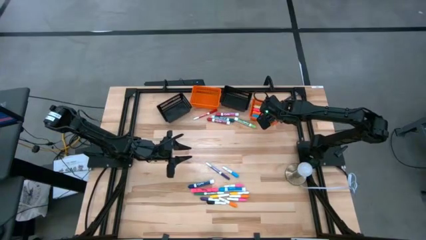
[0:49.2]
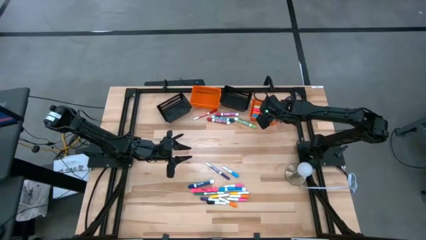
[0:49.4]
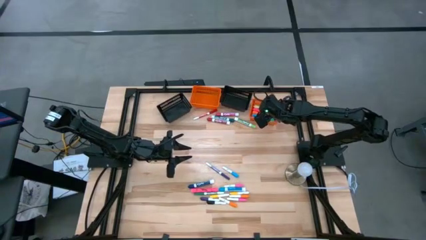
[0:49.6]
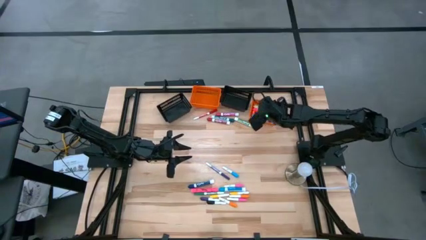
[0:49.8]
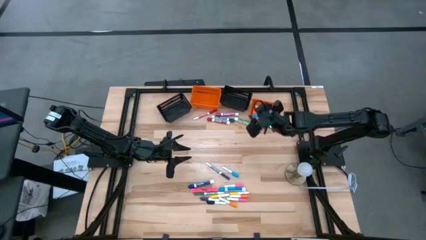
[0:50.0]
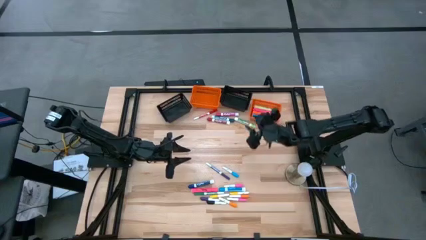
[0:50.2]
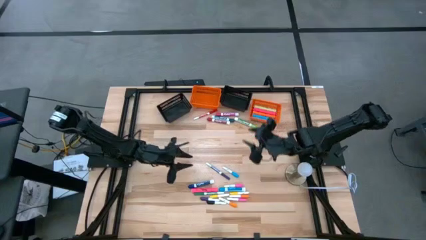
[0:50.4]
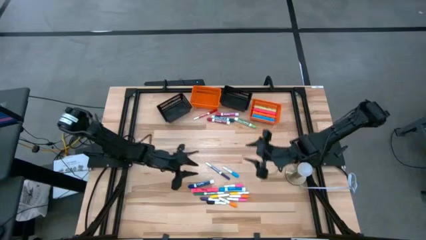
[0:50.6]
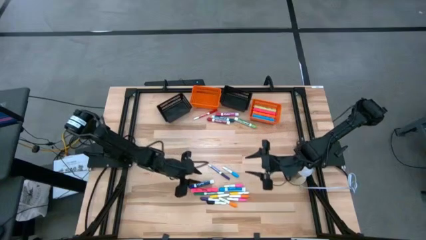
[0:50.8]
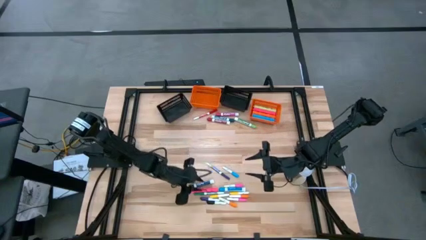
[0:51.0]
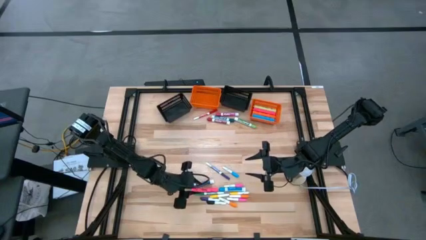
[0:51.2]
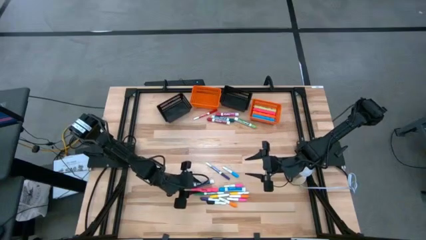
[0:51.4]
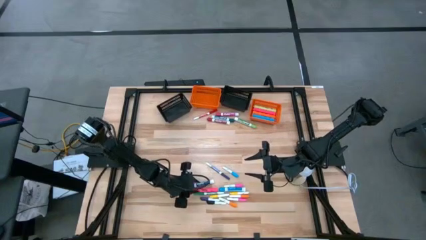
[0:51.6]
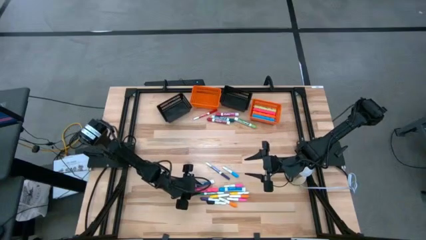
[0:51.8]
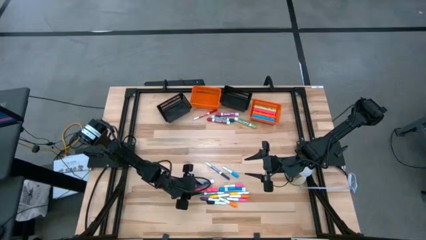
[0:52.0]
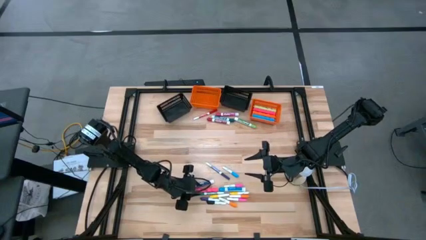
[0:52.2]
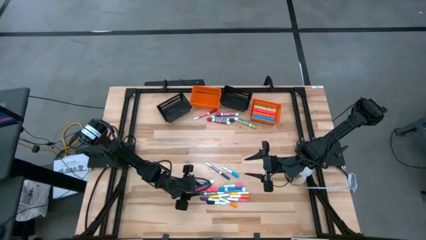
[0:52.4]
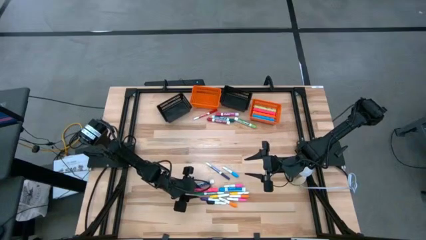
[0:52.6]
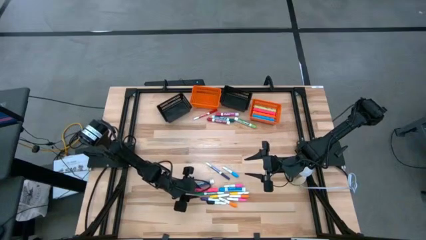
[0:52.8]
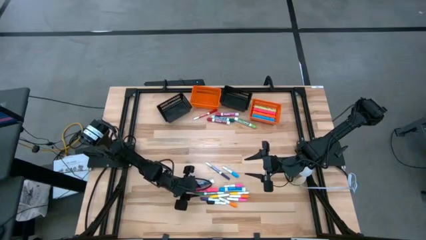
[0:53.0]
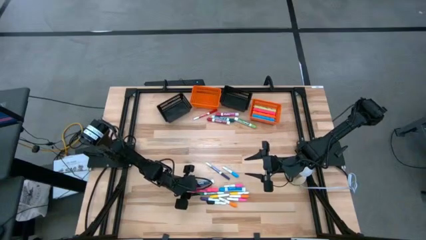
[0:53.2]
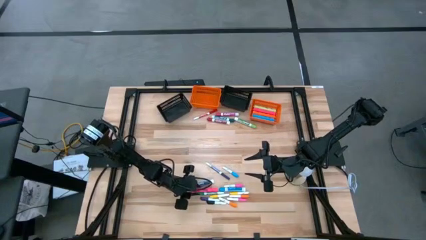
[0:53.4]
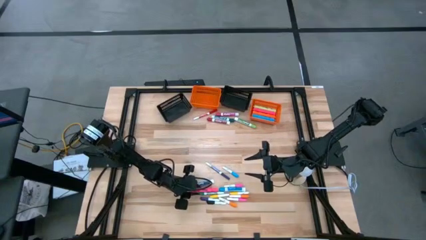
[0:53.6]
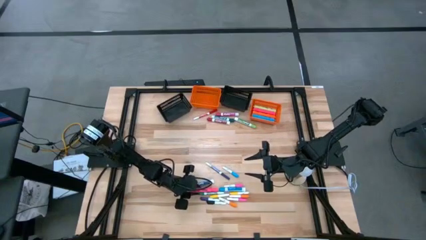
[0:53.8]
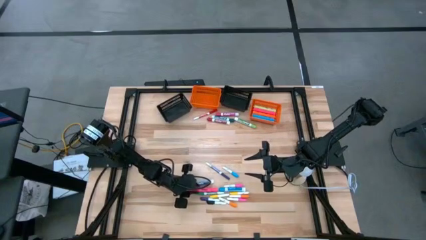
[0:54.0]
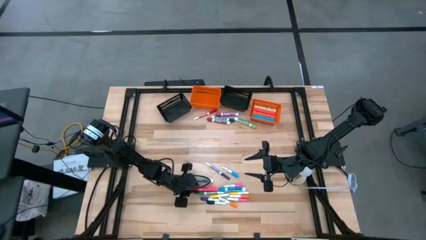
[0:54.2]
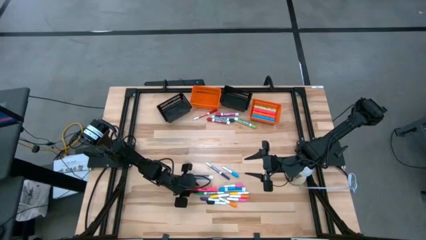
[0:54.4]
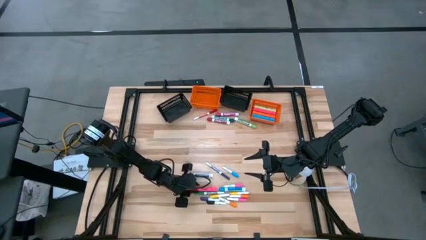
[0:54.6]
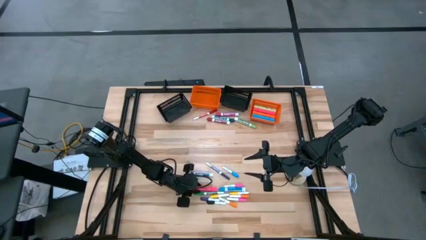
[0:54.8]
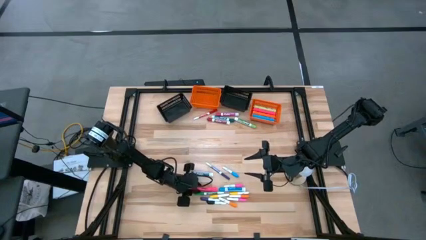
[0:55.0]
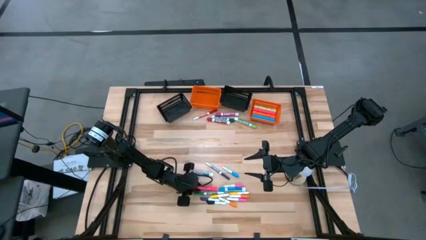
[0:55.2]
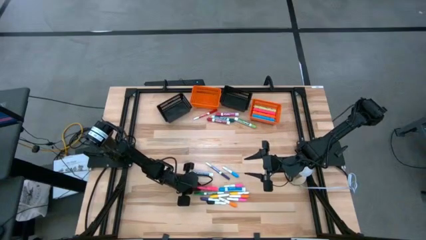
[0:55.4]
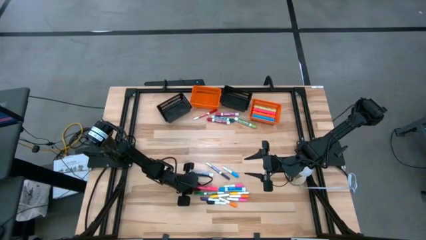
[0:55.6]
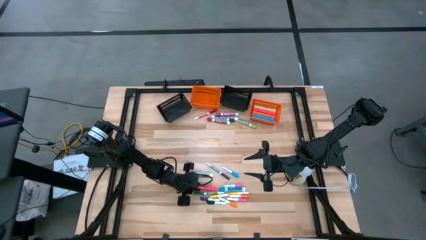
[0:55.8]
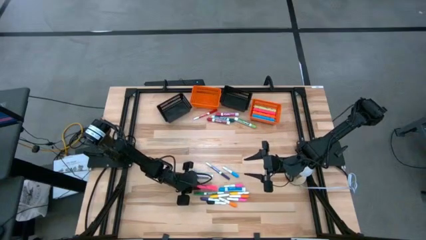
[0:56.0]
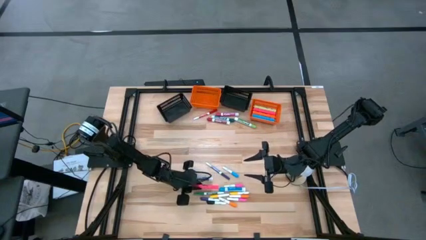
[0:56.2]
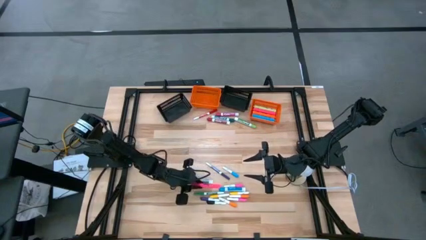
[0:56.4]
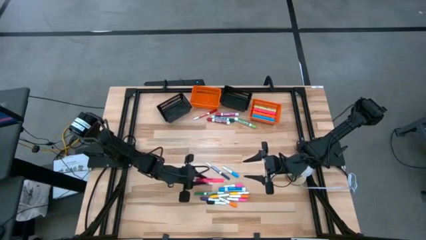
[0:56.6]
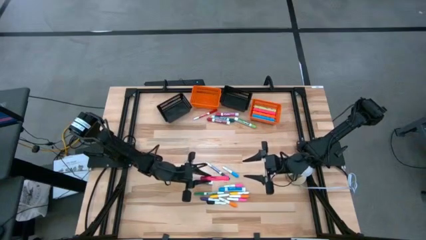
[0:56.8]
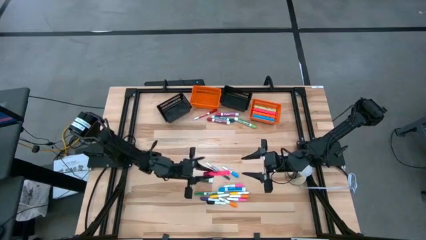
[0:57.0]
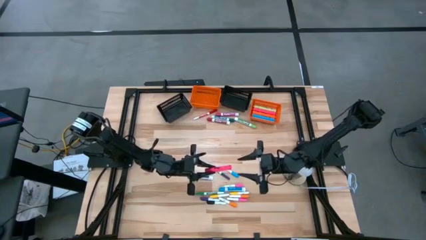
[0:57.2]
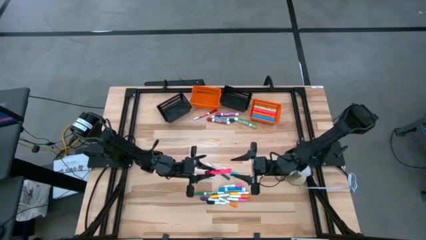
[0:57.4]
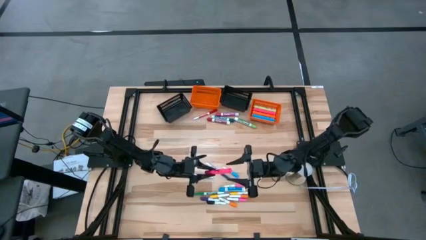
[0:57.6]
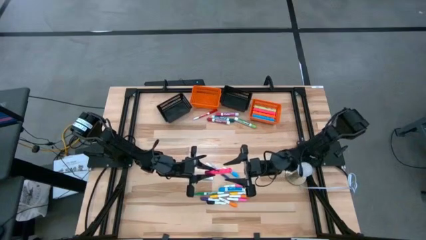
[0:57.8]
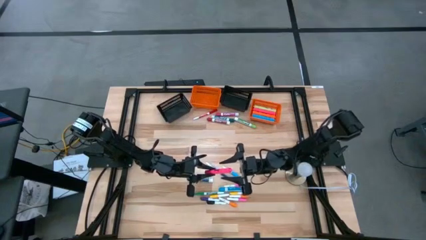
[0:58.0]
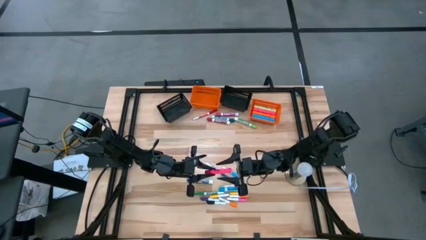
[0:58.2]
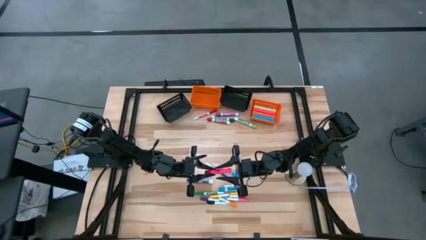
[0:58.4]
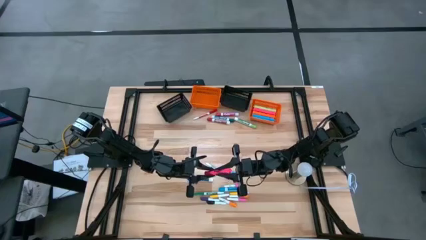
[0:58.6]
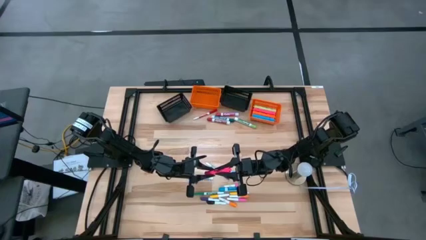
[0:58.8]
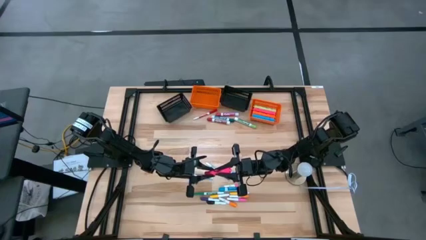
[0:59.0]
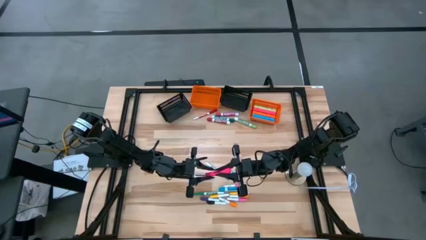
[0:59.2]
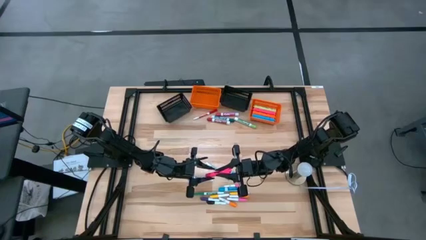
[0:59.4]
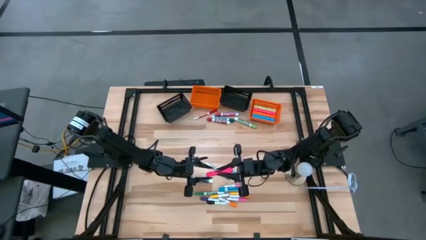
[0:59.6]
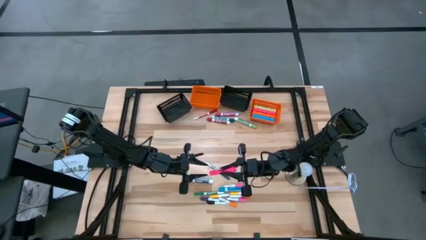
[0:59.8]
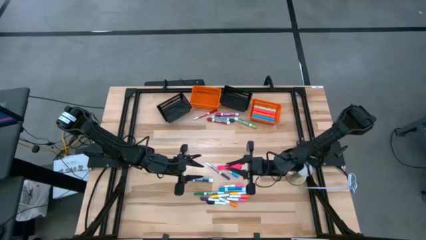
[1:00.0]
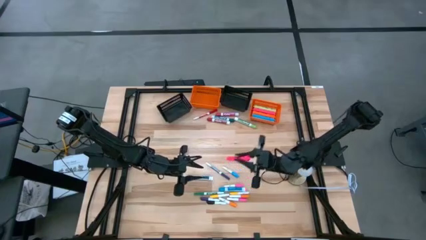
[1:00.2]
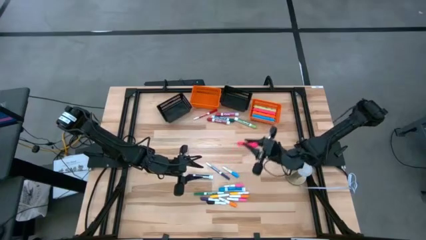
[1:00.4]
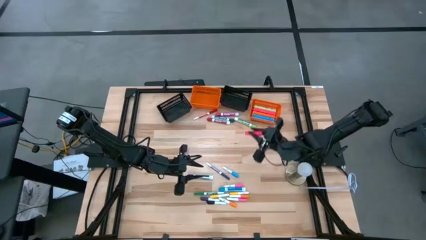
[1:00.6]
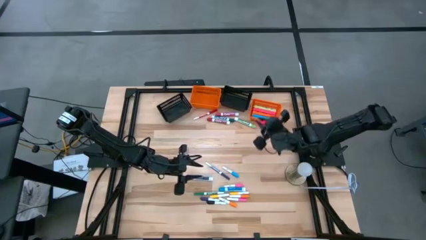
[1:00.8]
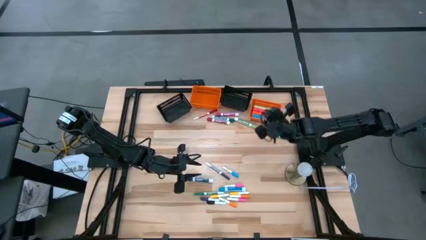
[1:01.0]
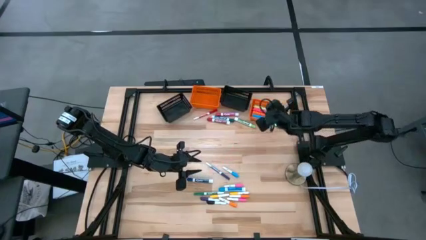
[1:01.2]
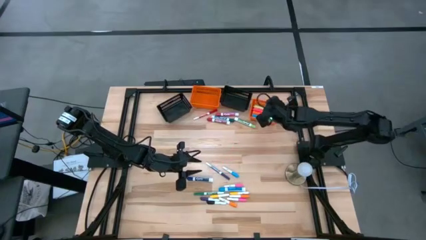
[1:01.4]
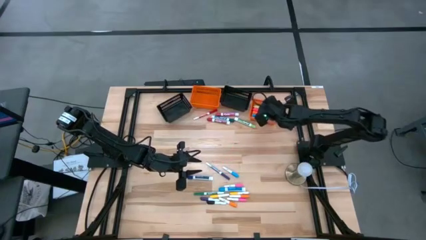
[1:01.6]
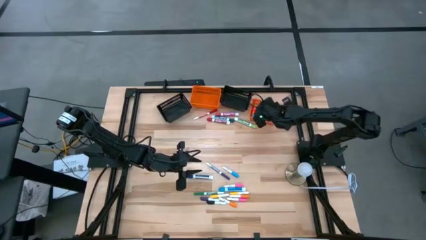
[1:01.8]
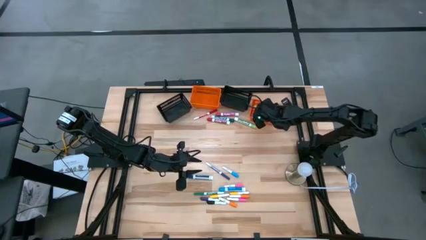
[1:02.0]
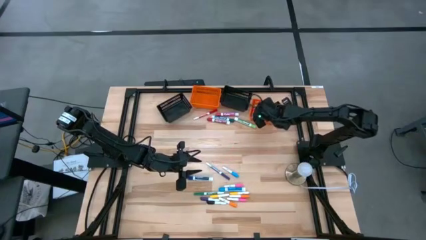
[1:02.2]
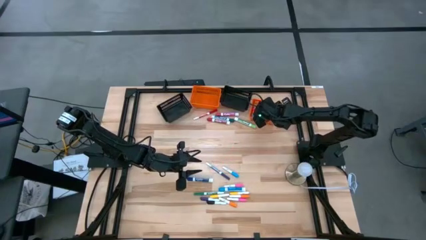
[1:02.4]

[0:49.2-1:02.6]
Task: Pick & Place Markers
Put the large pink highlighter into the right orange bin

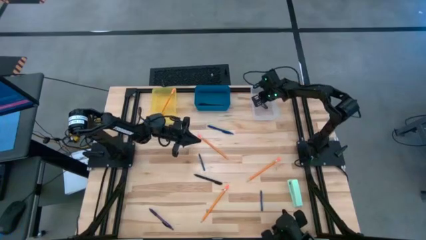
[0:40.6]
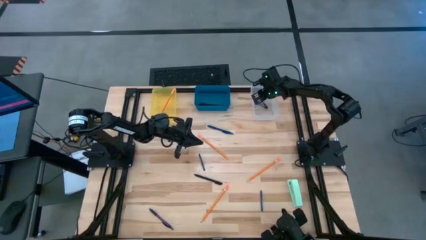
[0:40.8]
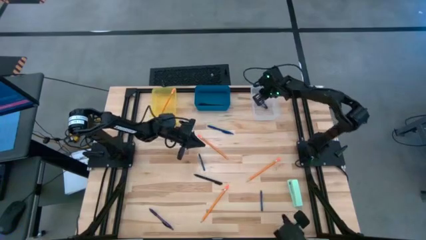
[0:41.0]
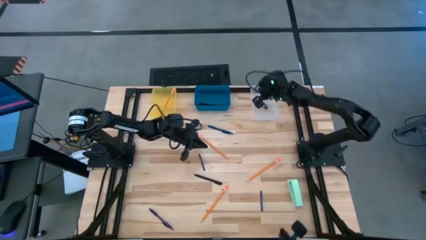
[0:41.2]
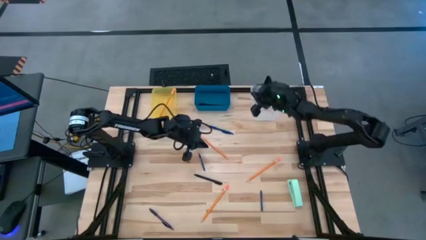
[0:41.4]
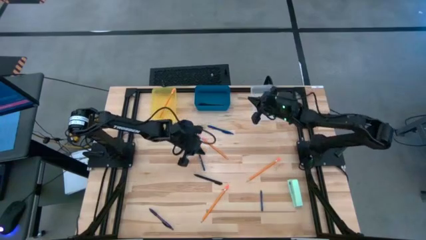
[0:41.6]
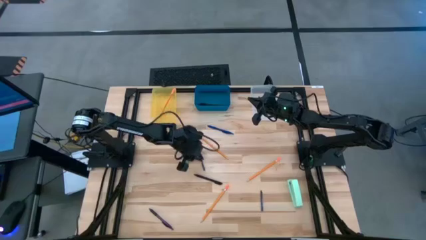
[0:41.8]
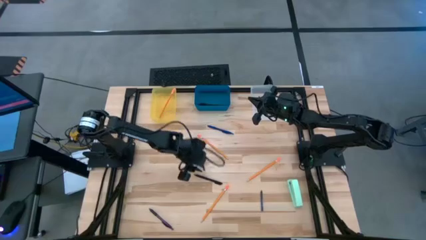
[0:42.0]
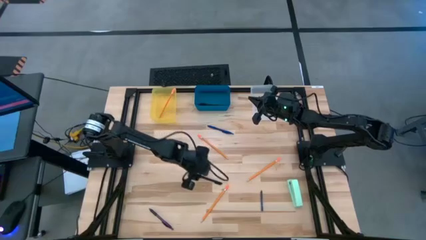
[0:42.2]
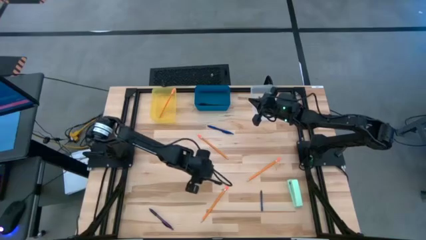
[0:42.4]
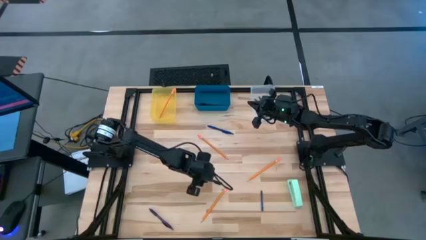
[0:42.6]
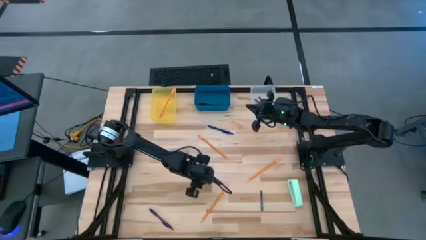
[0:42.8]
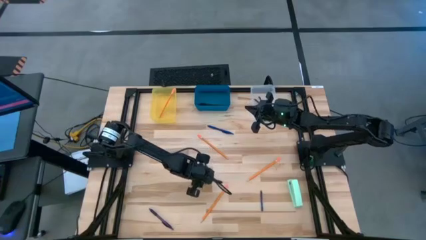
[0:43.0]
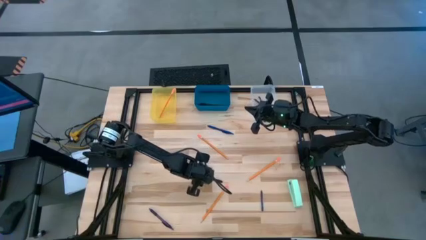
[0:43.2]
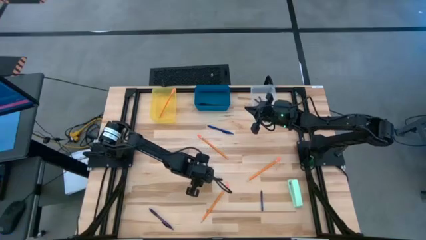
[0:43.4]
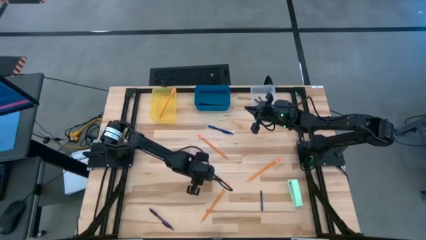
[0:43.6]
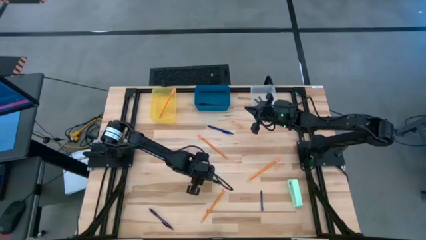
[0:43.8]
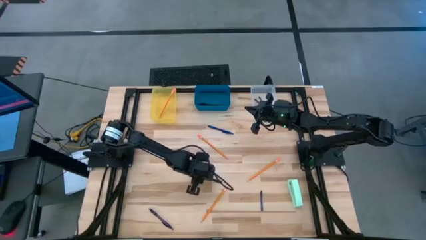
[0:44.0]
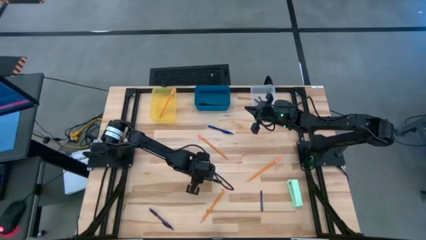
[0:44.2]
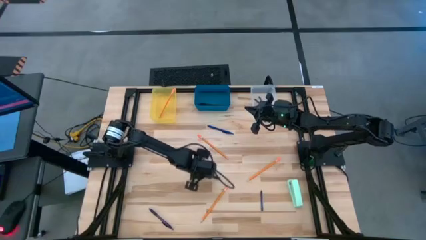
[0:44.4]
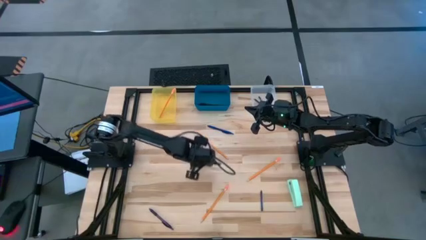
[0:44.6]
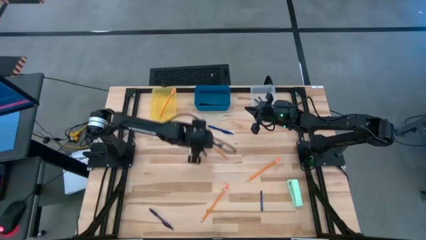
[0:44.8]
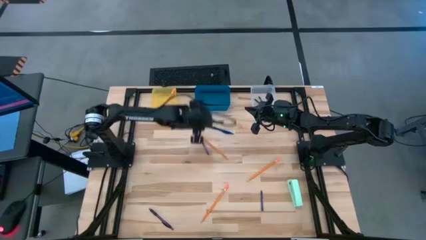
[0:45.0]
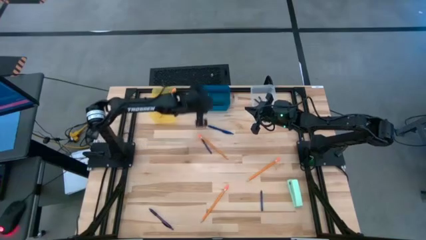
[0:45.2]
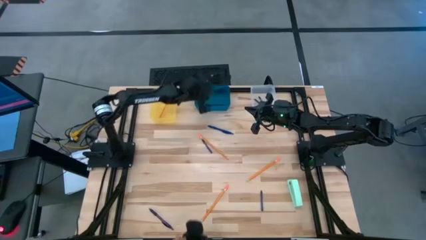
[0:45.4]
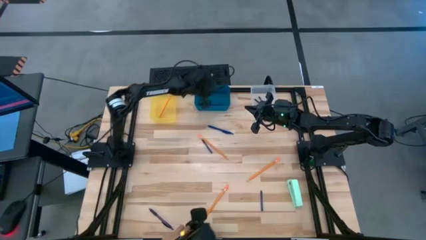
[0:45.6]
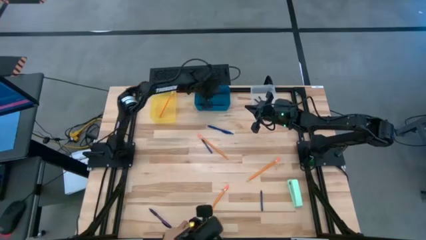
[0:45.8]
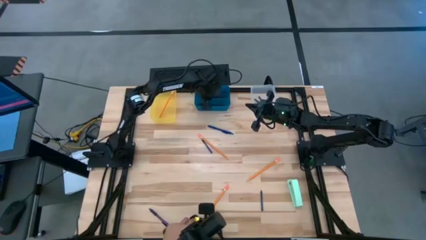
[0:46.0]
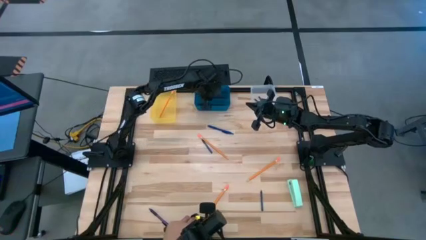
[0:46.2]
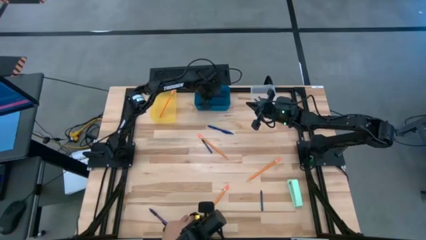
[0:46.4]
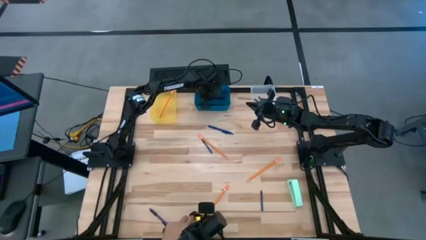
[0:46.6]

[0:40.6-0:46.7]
Task: Sort crayons/erasers/pens/pencils in bins
Put the black pen into the transparent blue bin
